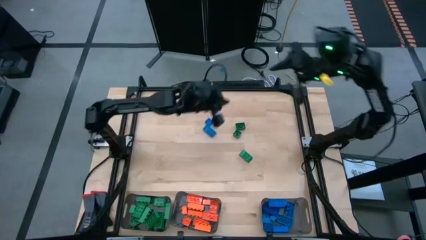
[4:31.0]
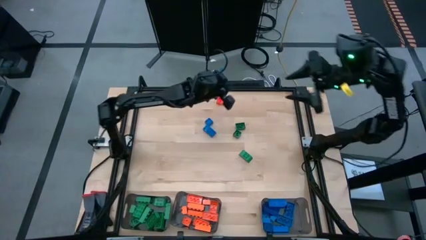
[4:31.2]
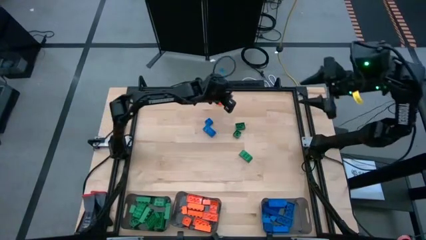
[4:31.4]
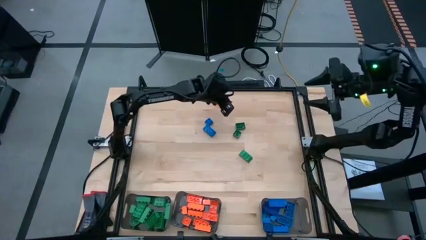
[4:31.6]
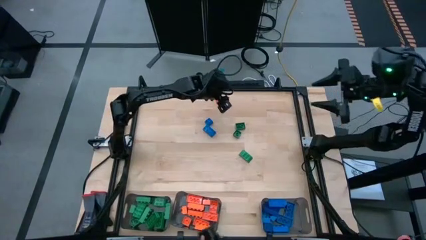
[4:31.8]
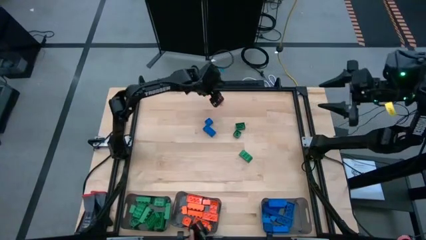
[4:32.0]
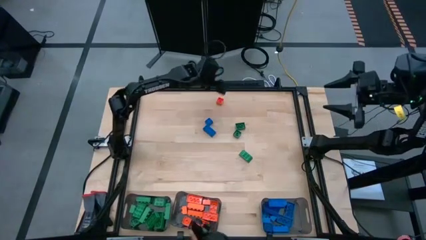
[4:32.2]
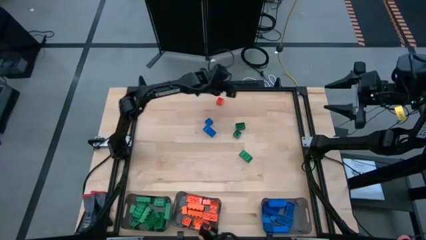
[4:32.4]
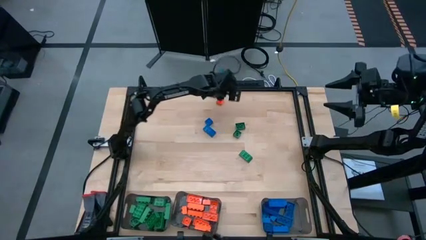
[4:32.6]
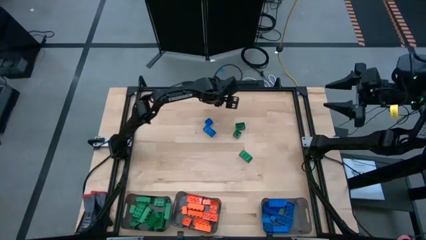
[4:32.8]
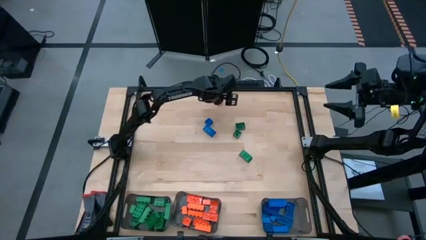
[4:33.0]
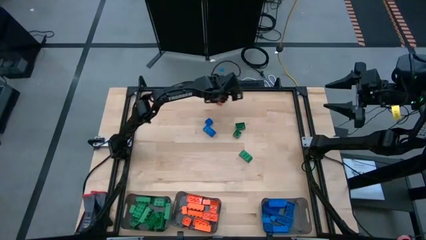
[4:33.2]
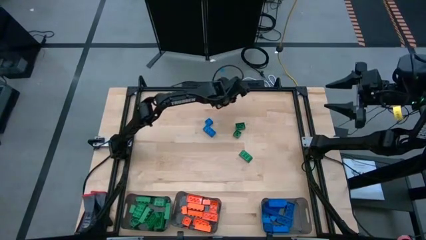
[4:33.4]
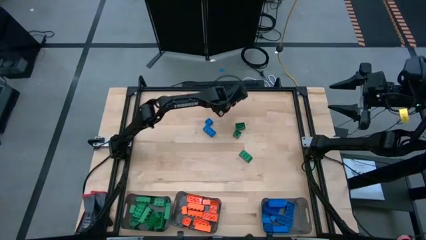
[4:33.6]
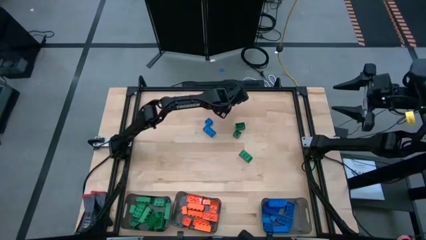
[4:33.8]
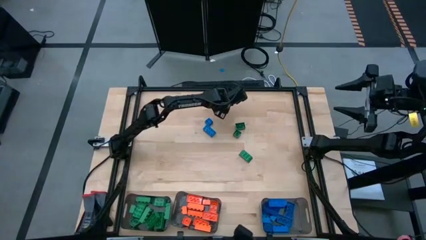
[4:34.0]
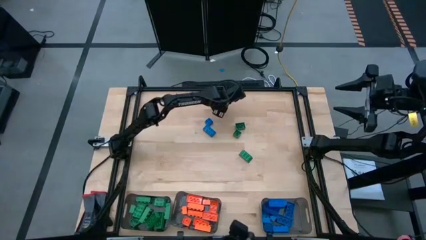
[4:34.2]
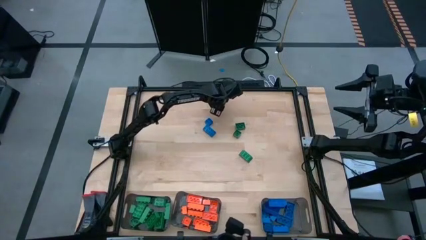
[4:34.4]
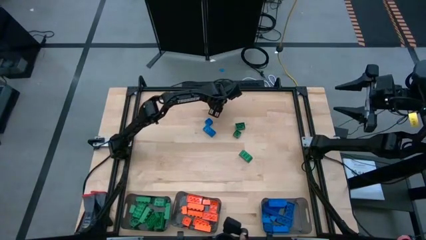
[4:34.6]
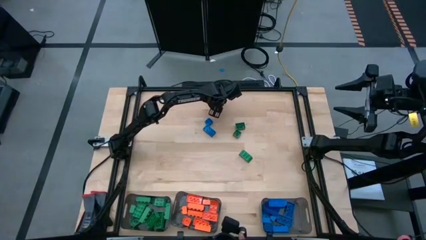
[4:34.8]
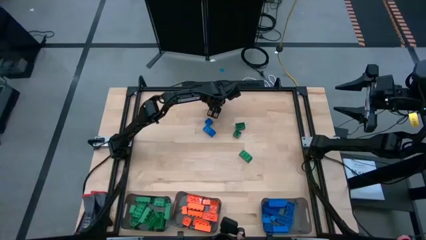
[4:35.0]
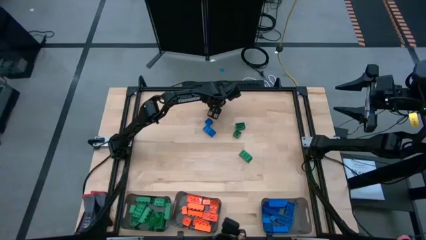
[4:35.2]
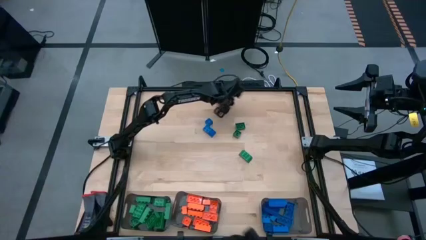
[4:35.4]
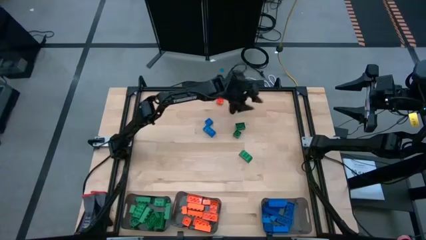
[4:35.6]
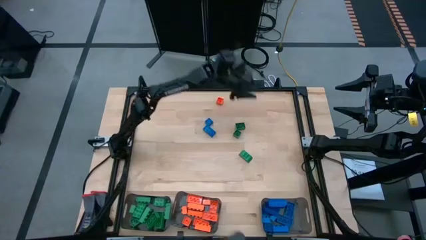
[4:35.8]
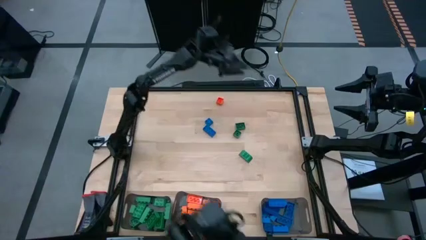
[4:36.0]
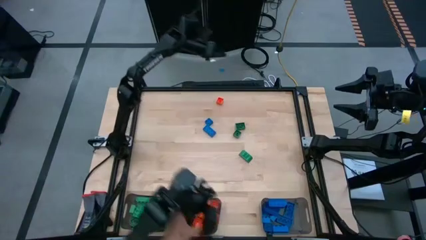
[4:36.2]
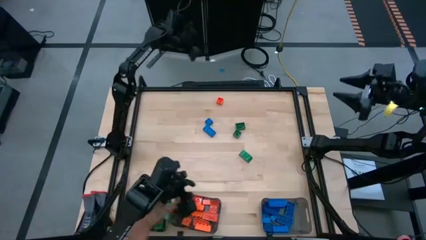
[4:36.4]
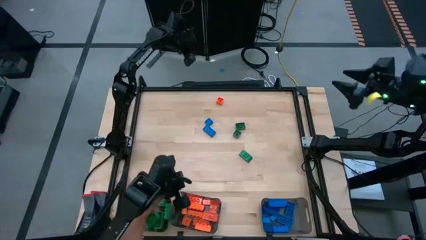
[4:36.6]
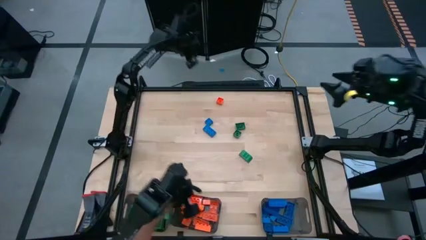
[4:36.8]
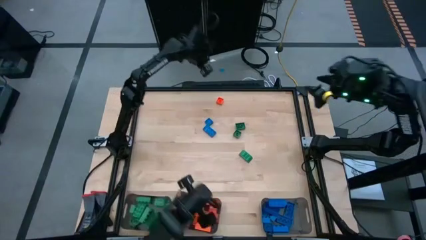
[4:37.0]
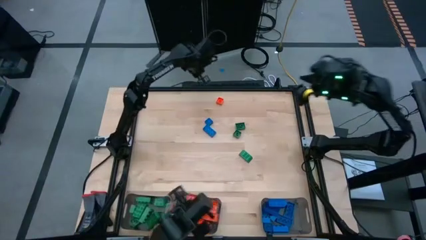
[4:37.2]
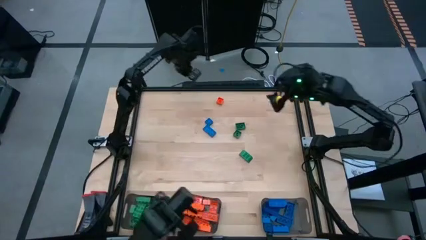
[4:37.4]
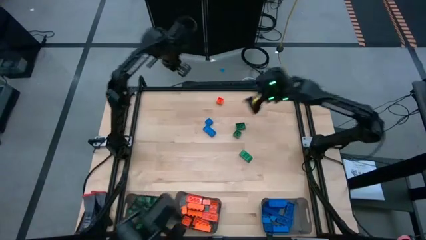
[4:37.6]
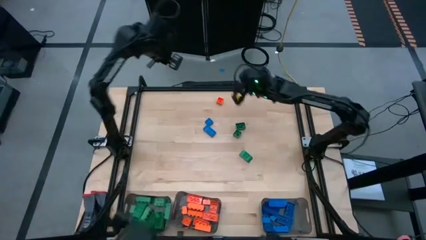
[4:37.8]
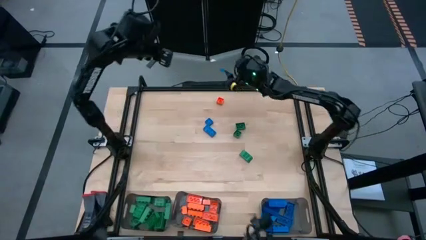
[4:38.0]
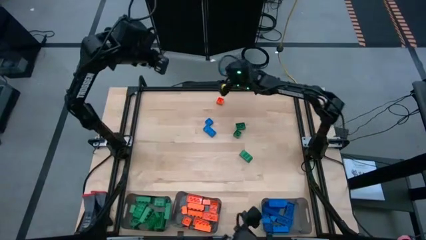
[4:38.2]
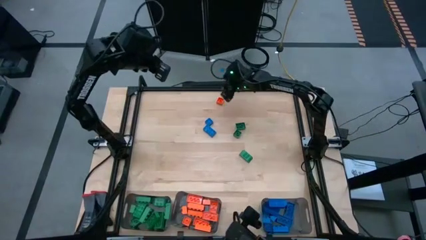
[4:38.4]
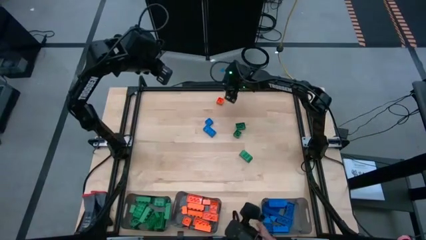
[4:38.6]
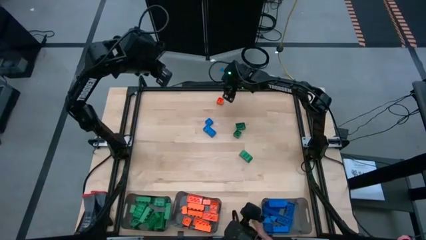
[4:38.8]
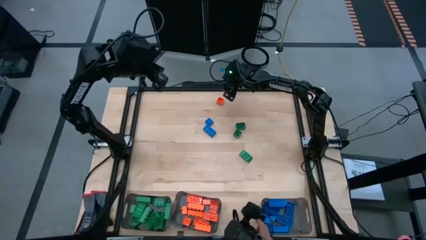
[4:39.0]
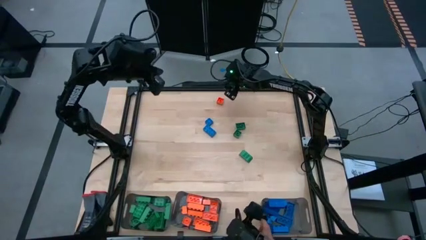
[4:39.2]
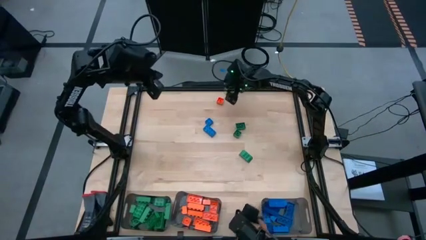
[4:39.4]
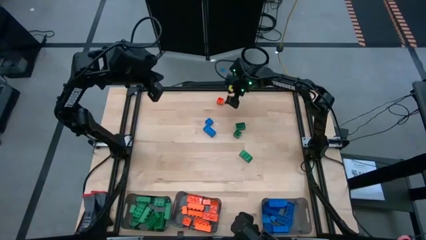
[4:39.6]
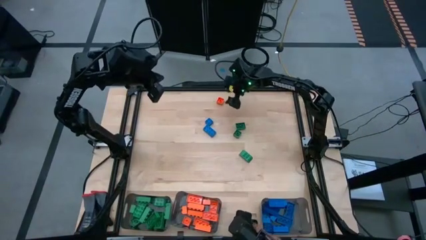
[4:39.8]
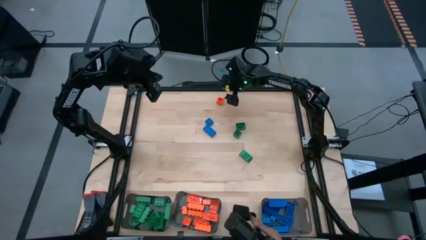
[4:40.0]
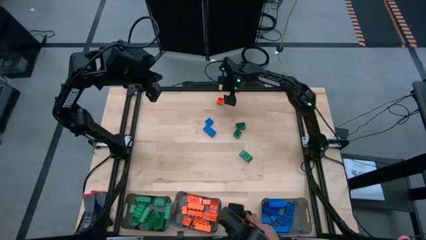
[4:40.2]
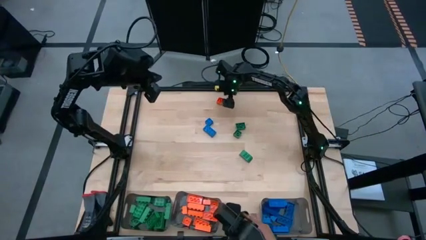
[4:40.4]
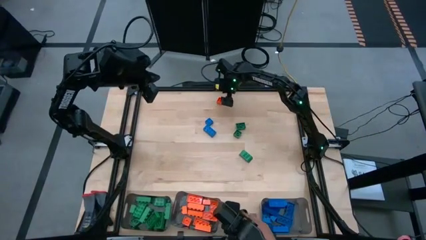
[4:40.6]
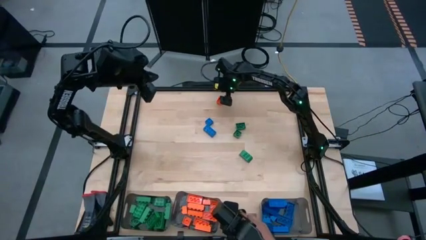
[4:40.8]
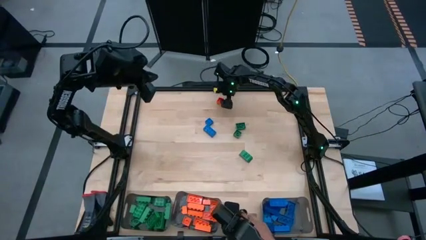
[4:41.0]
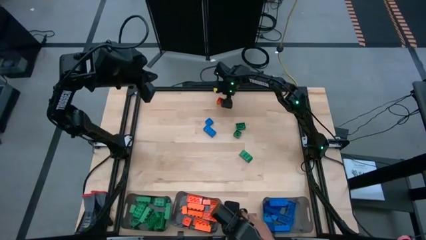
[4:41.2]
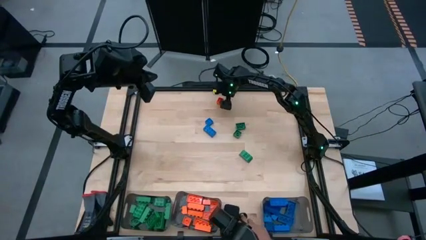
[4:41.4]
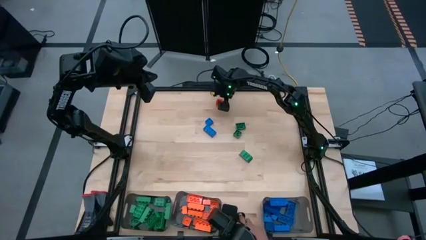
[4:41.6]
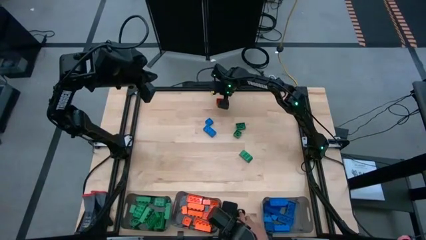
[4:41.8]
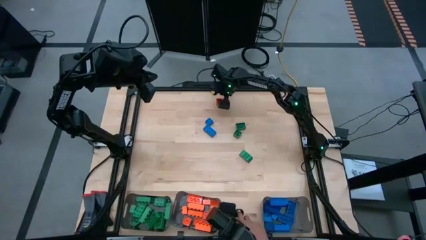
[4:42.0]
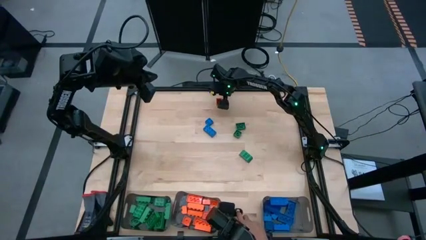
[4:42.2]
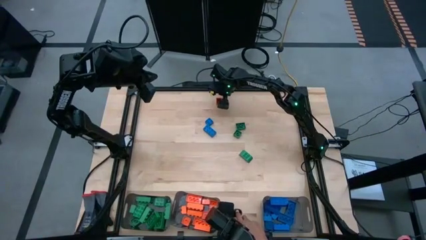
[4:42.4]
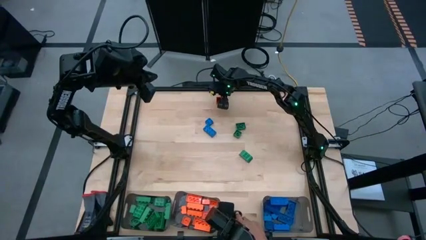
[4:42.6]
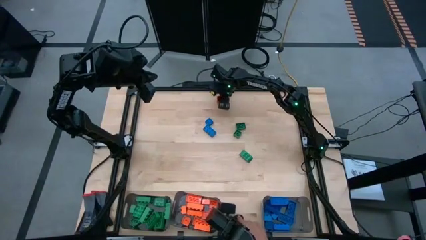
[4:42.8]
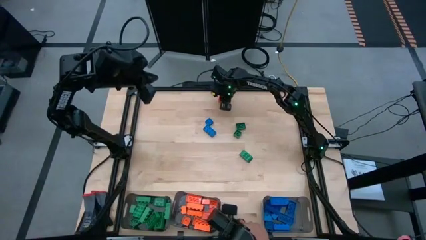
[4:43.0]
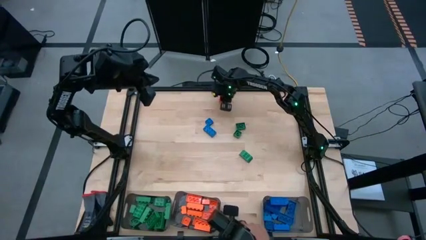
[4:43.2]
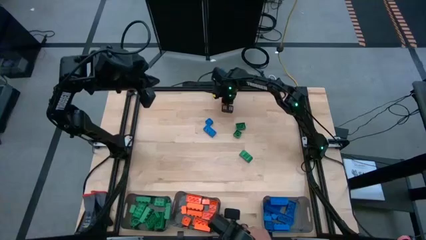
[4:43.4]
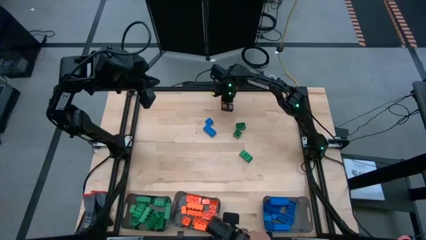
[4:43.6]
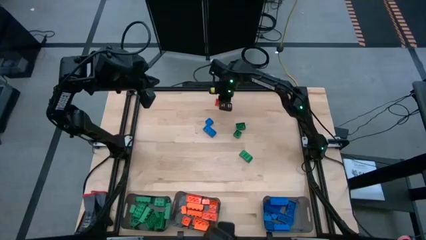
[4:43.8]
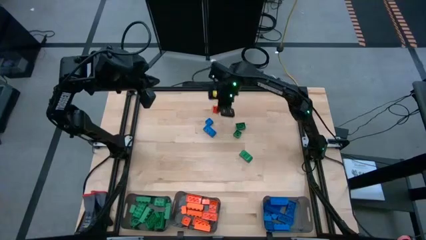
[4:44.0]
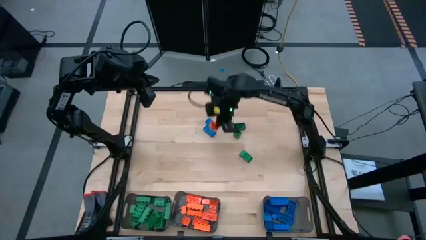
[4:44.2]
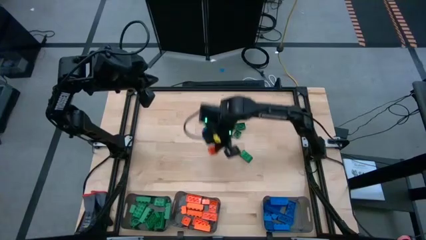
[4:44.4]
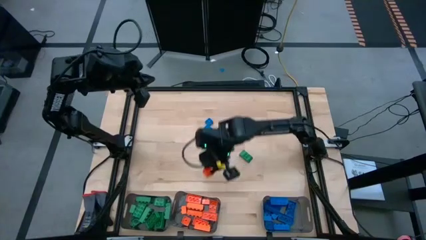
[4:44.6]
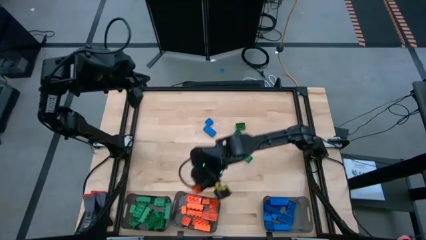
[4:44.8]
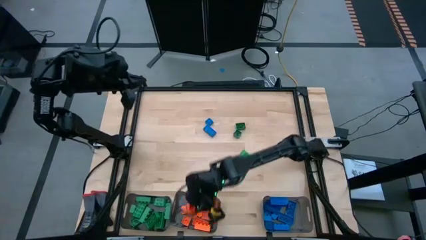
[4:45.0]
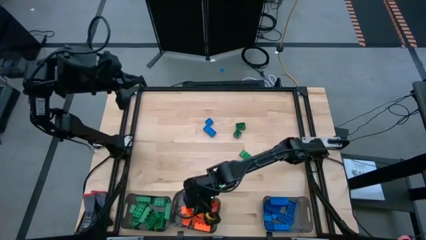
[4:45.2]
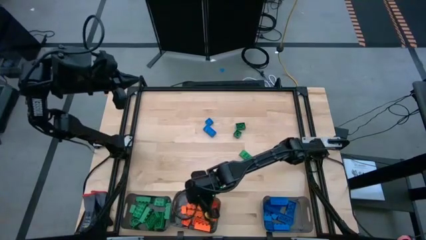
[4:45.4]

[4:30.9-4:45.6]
Task: Sort blocks
Put the orange game piece into the middle black bin

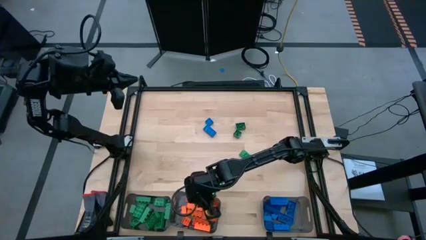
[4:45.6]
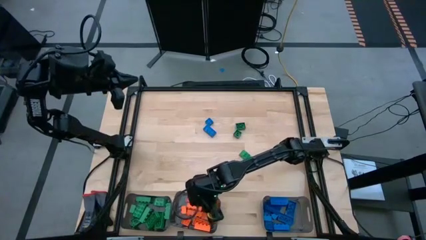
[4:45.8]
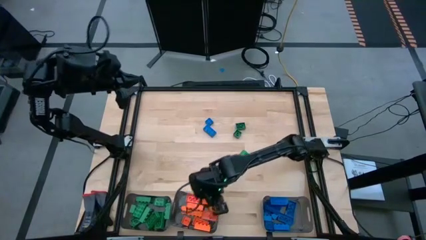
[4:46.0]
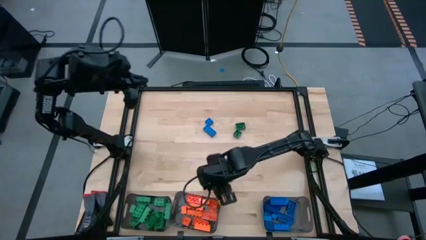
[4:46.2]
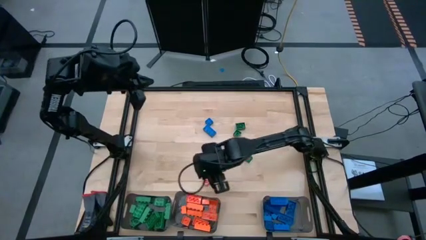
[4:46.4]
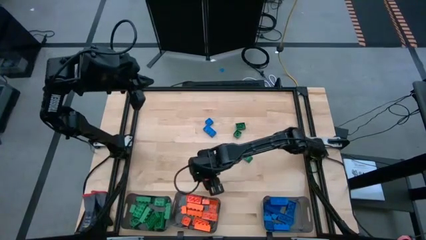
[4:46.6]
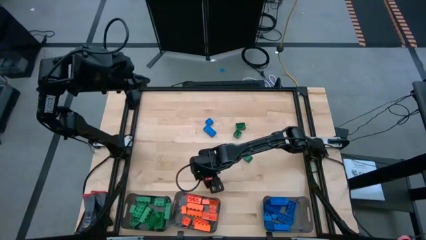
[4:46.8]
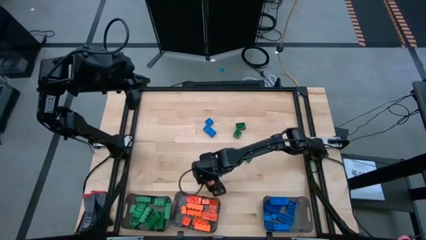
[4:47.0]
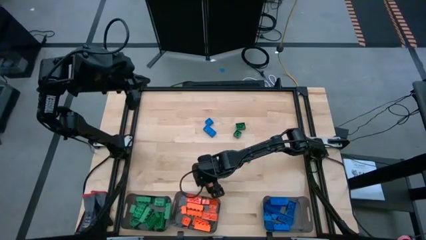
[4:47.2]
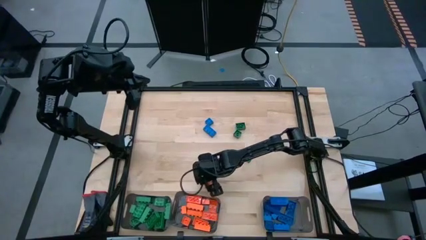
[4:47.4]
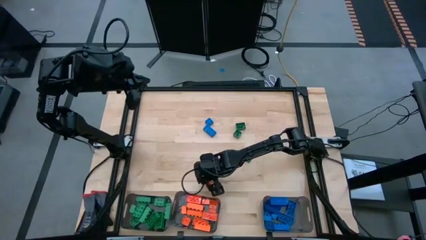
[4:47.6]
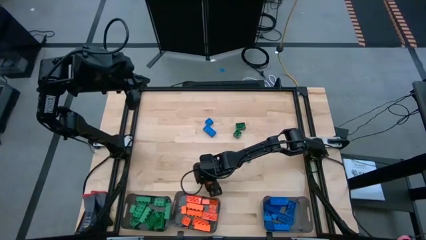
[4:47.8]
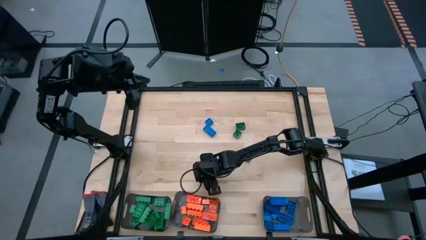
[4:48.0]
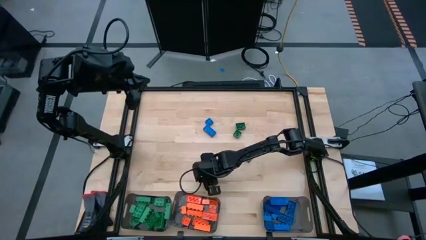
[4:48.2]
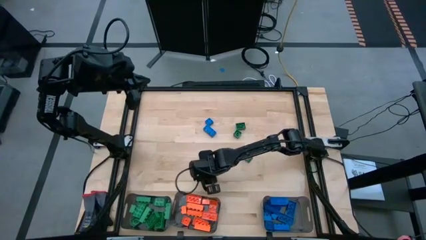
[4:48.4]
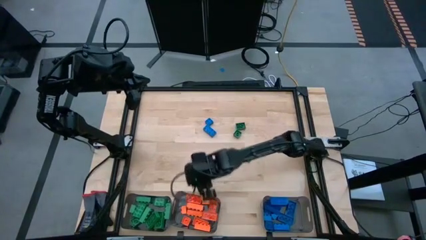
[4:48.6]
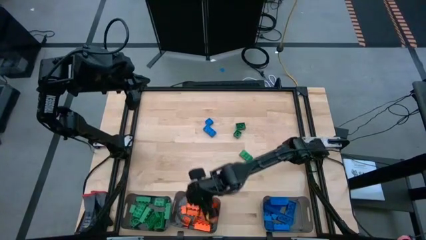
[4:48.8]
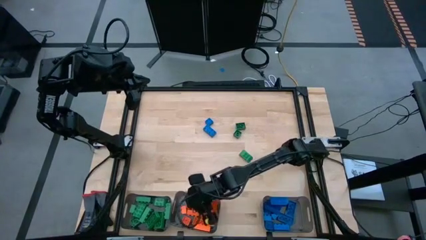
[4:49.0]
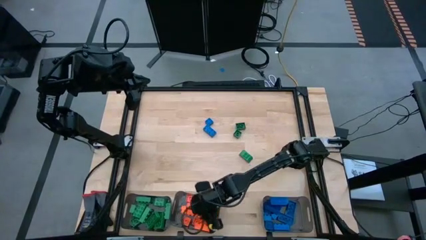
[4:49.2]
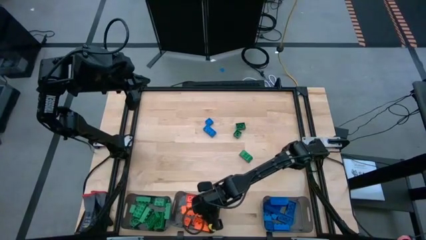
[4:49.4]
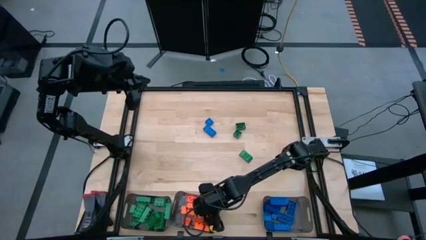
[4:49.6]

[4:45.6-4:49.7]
Put the orange game piece into the middle black bin
